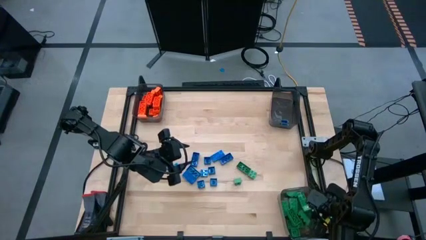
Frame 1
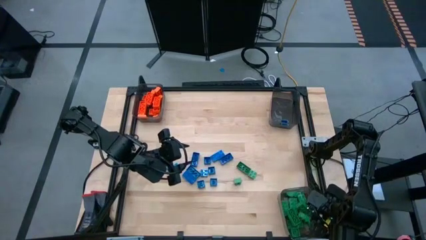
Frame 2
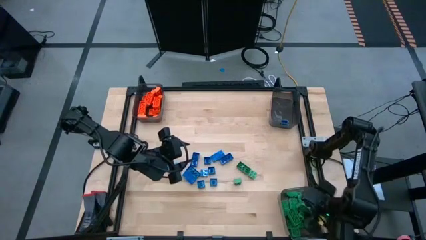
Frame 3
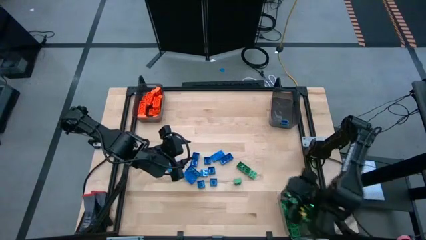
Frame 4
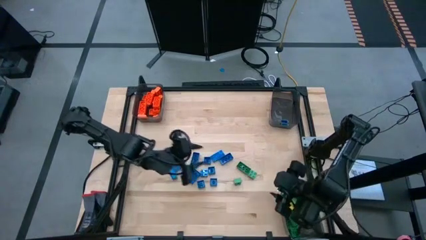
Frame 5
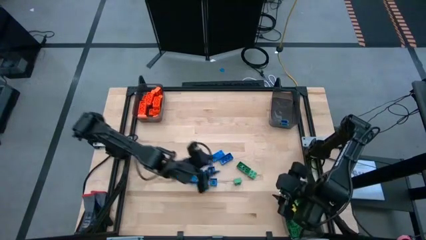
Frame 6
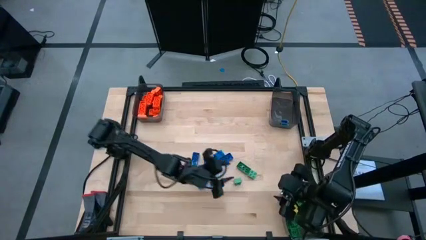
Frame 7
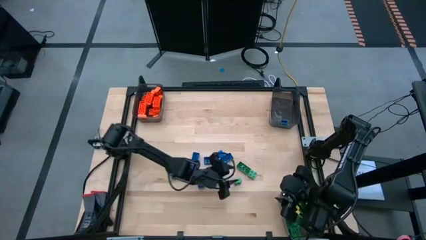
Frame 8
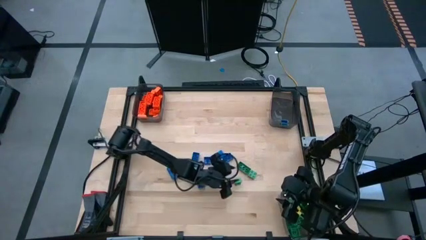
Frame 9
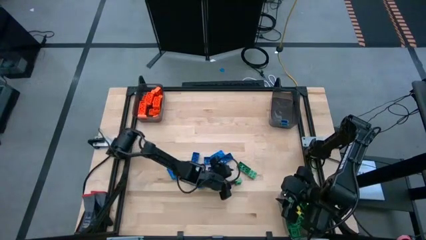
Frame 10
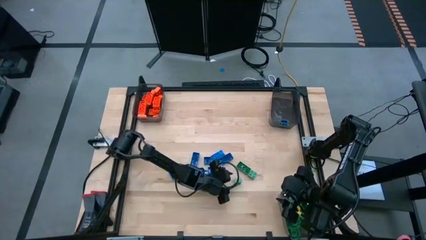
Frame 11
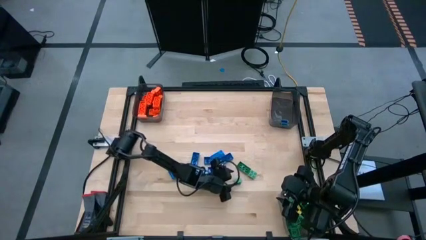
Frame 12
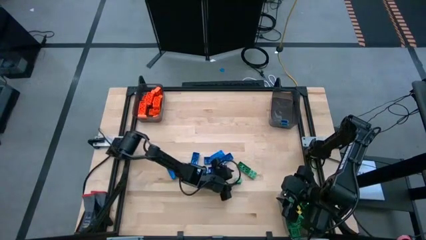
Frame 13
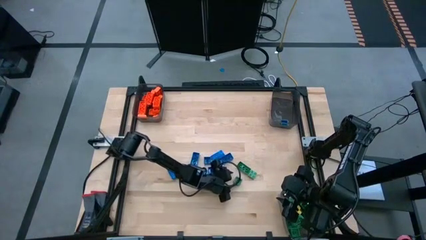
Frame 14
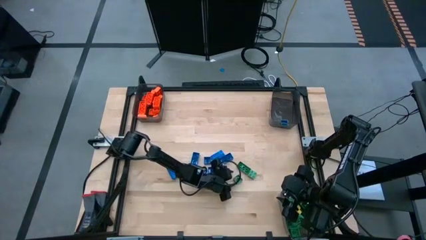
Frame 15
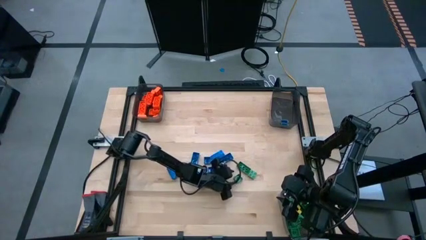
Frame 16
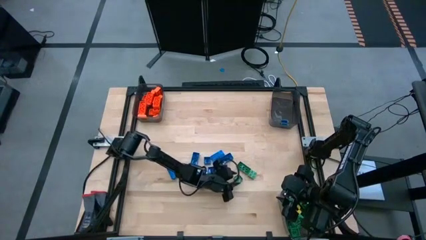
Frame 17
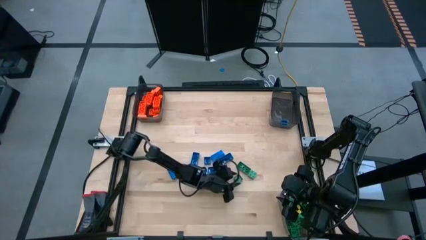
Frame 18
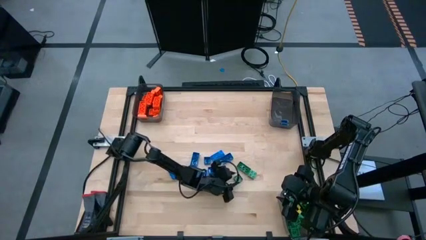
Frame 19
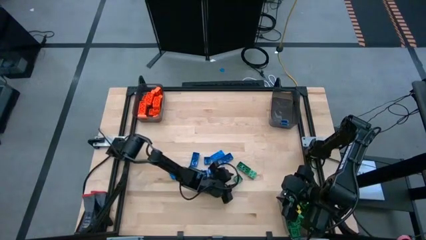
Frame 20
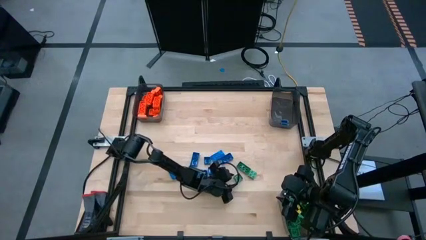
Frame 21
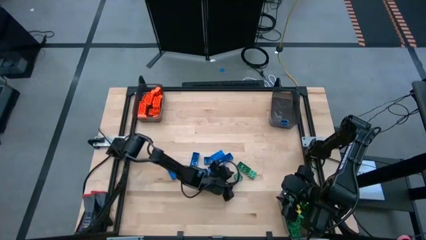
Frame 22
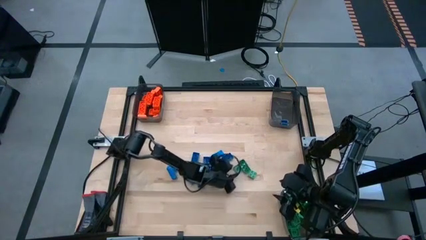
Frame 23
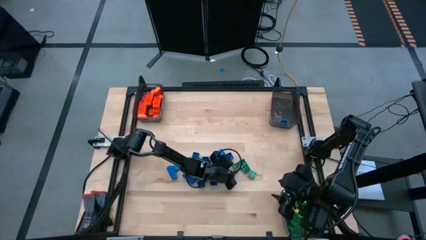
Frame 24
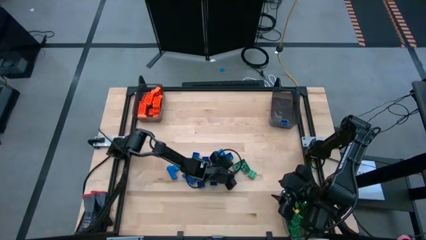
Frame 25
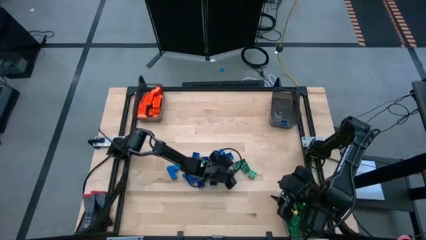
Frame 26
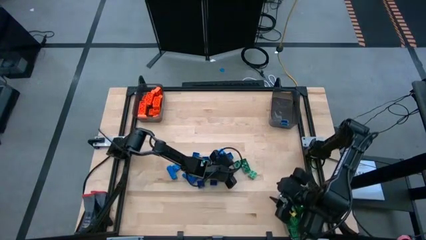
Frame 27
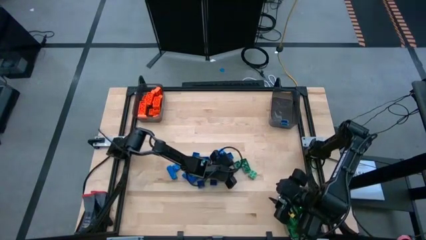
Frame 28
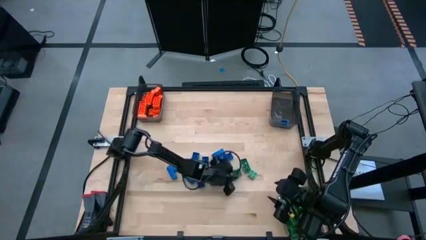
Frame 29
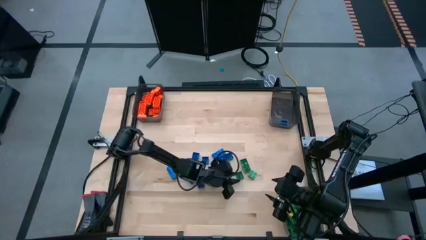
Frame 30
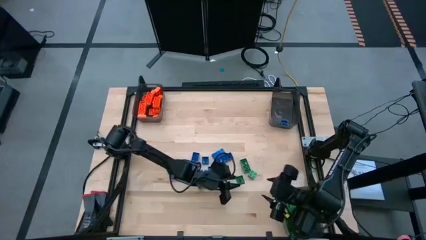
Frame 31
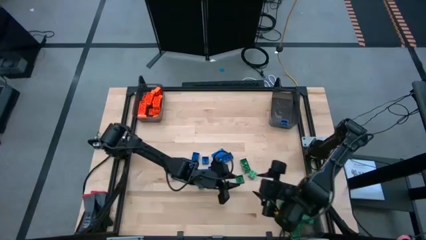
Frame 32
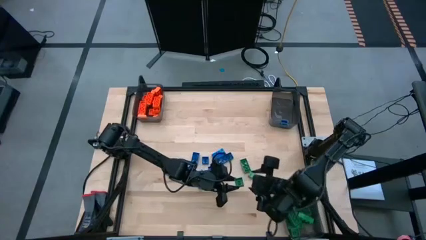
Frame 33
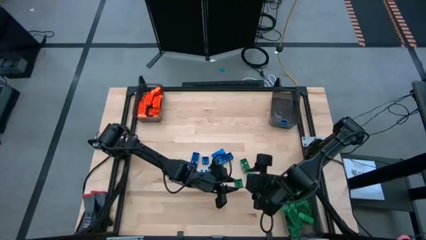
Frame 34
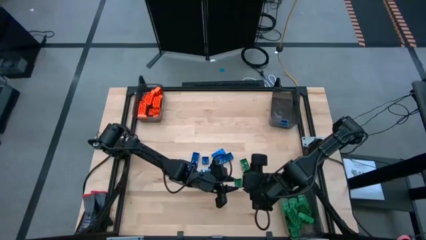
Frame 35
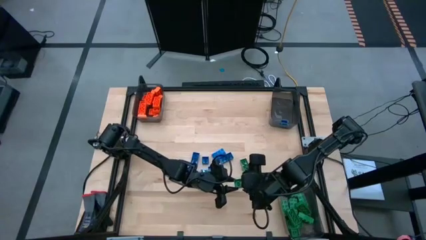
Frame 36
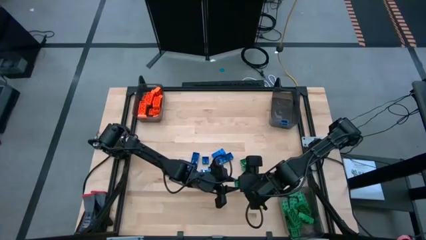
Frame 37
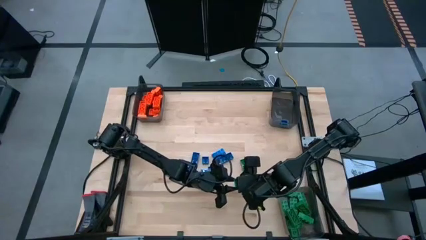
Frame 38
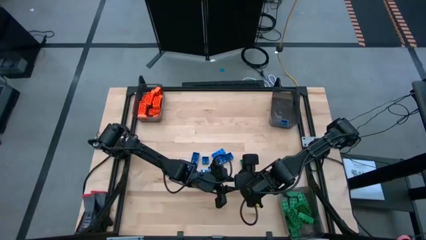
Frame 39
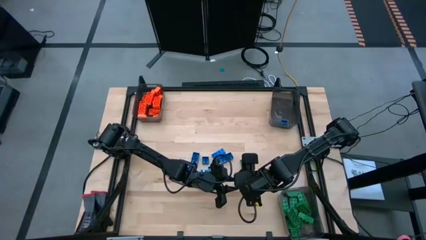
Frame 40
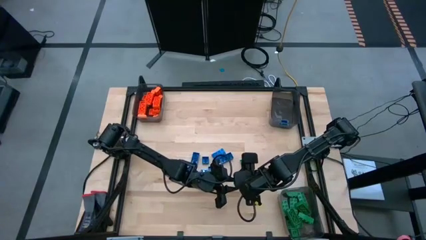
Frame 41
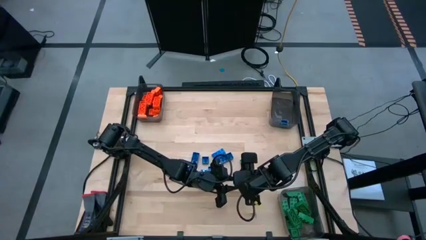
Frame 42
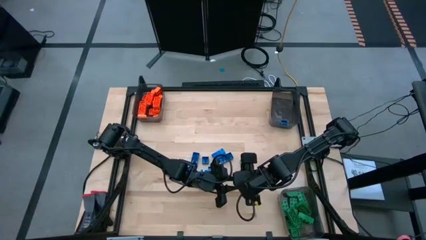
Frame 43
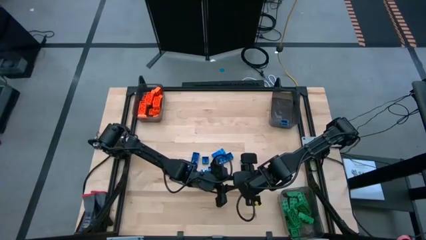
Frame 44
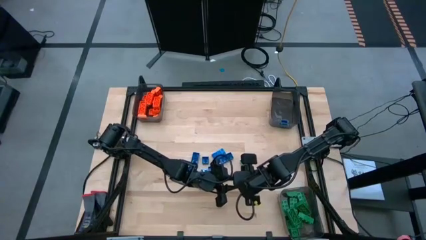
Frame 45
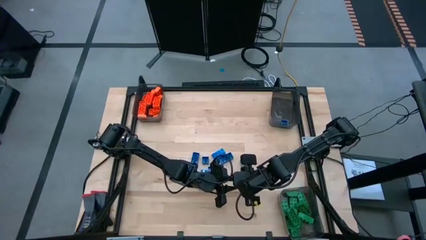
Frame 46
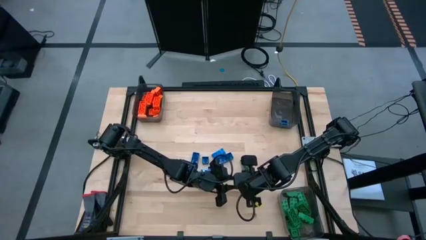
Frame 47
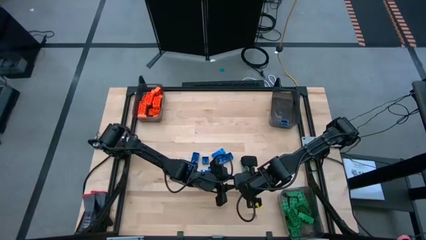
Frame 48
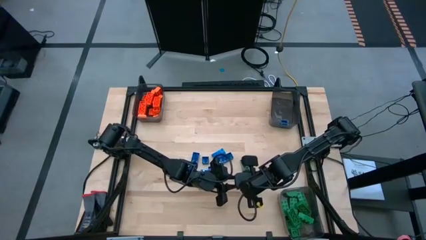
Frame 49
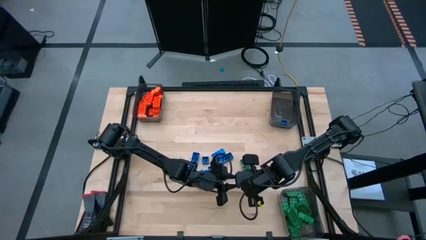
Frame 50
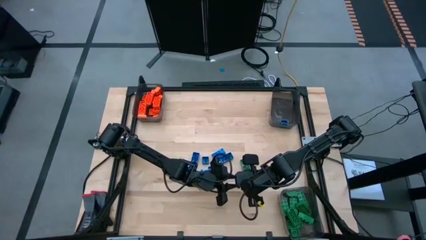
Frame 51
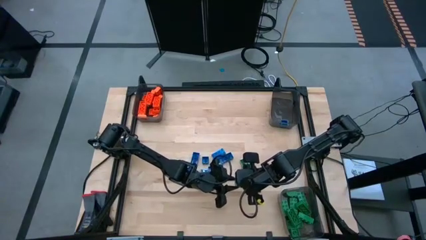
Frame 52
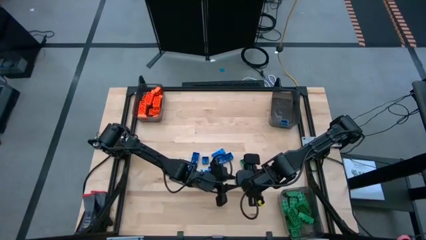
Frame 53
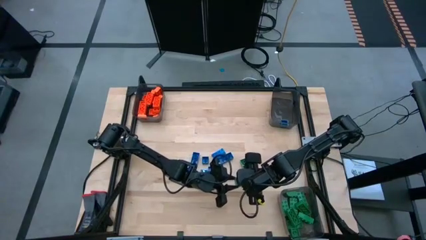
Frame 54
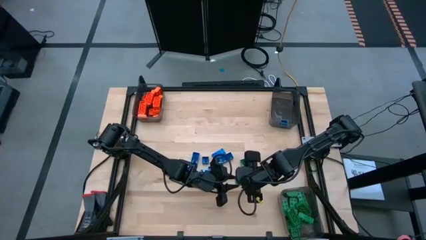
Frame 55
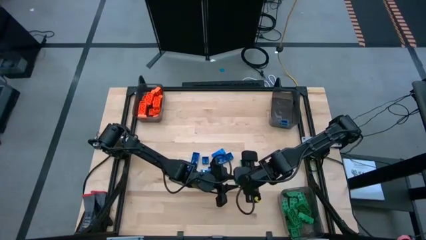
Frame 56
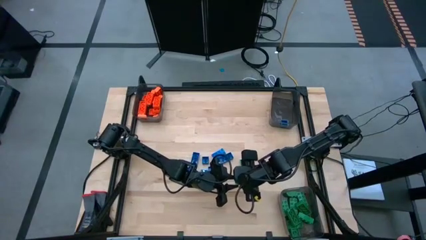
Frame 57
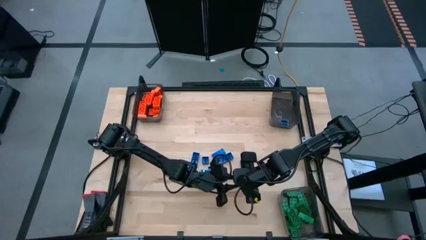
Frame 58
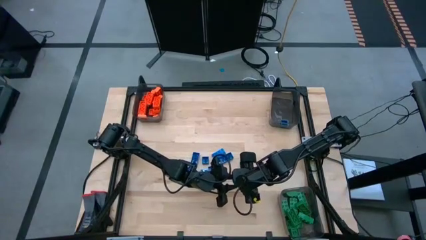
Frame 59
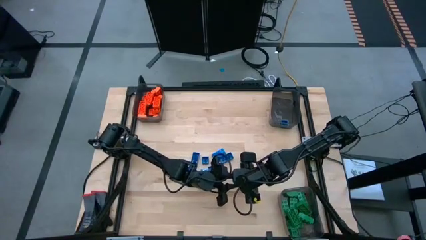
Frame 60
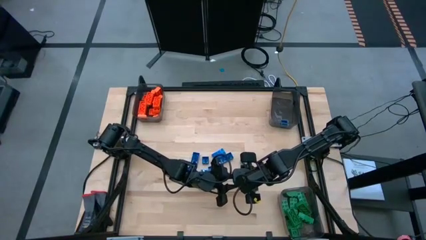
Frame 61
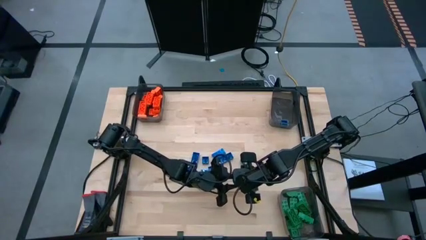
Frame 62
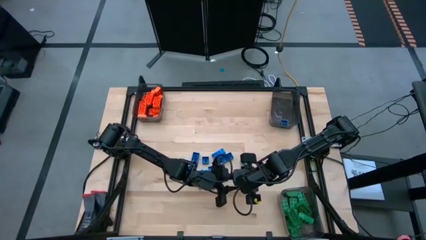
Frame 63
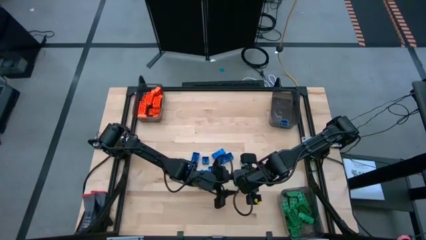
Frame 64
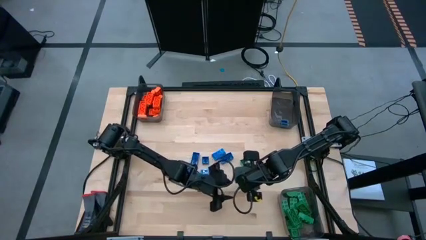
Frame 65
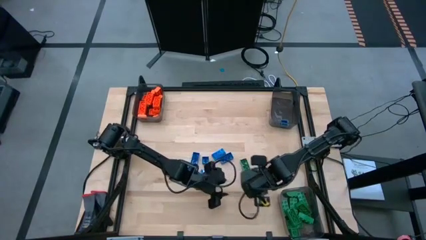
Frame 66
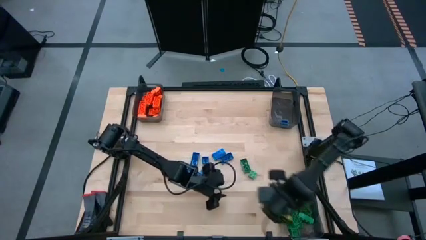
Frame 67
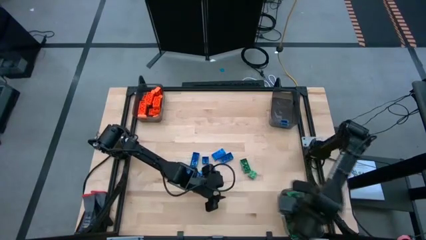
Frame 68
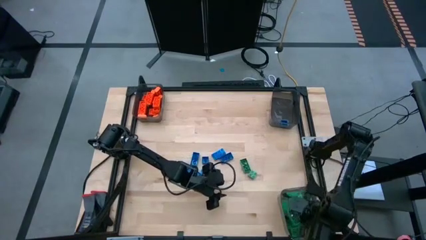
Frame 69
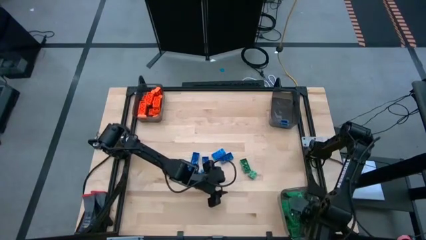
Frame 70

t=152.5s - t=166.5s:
Task: Sort blocks
Put the green game piece into the bottom right black bin
